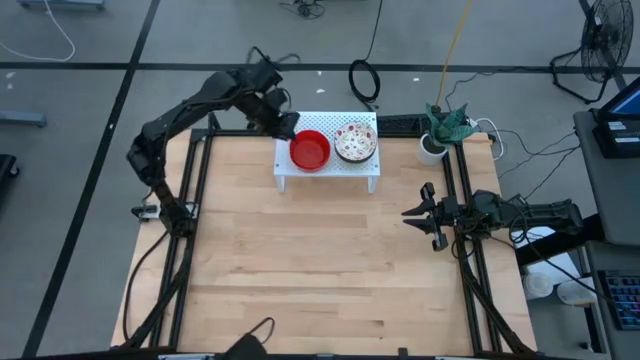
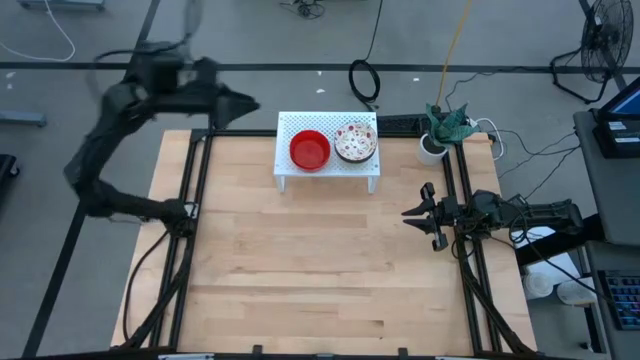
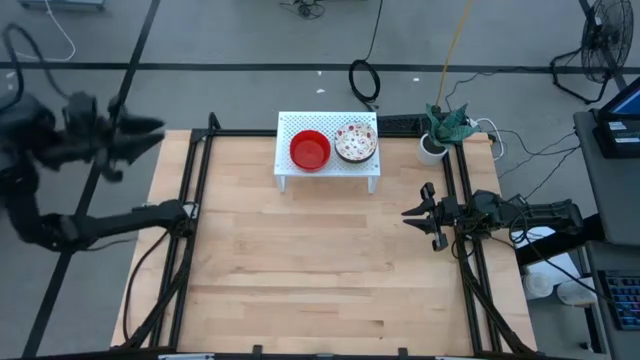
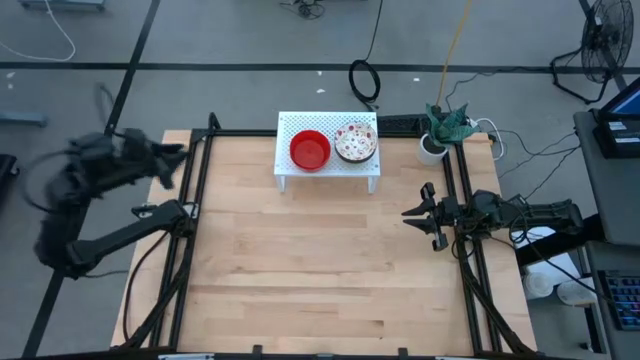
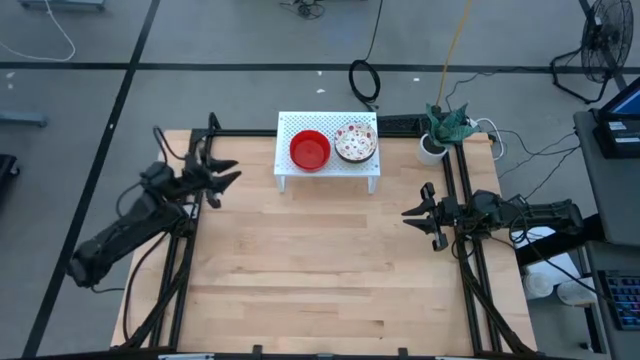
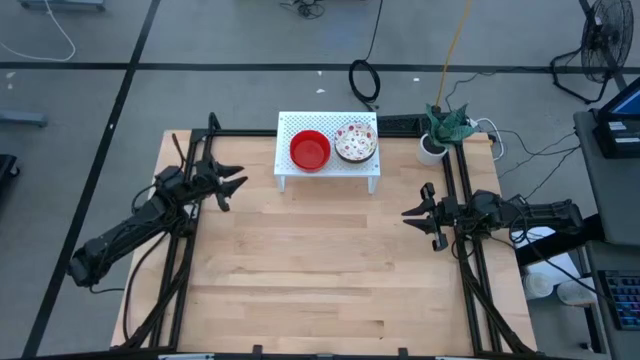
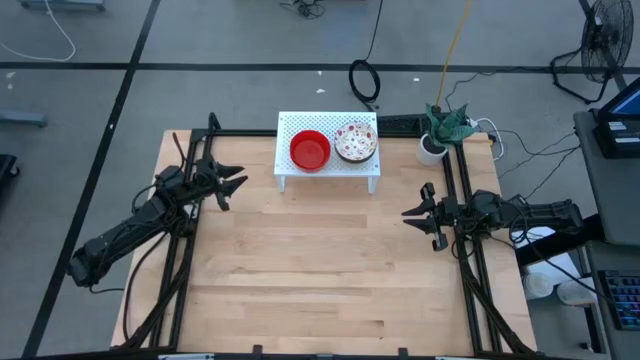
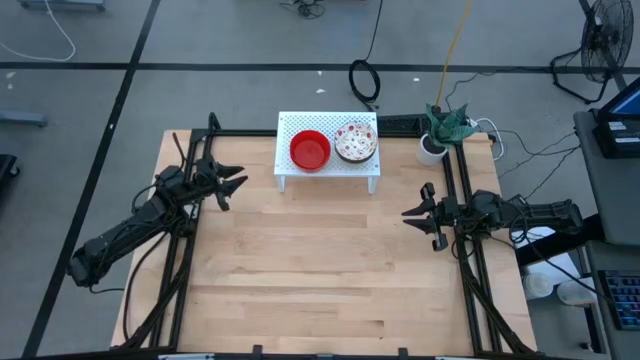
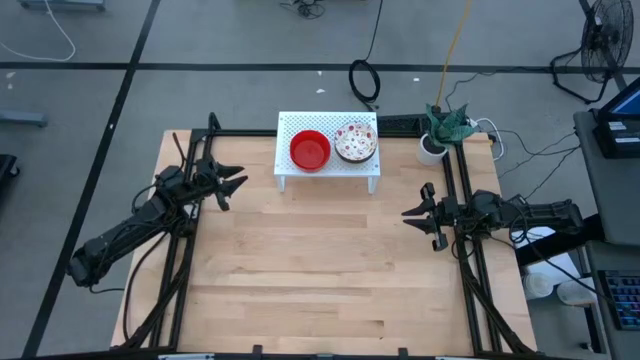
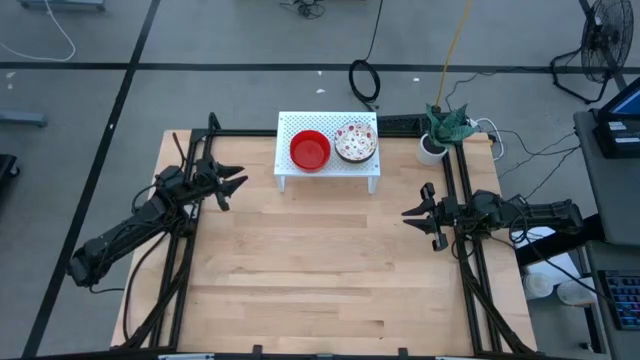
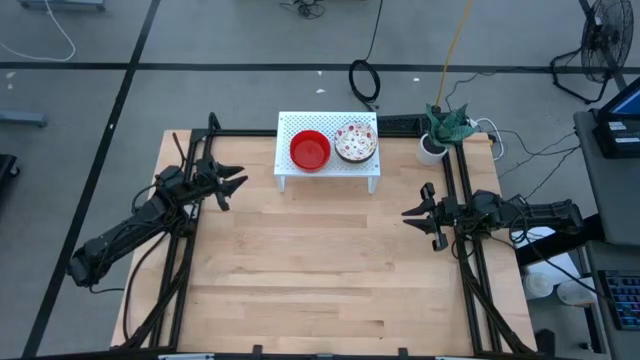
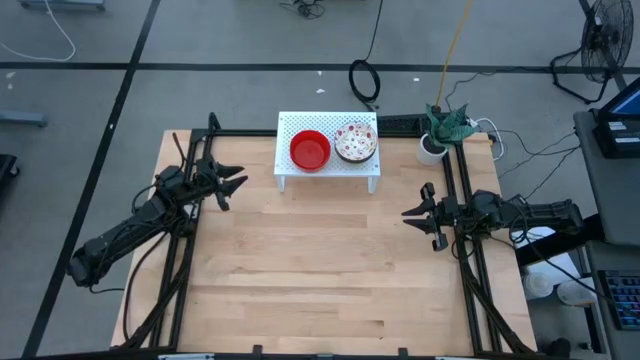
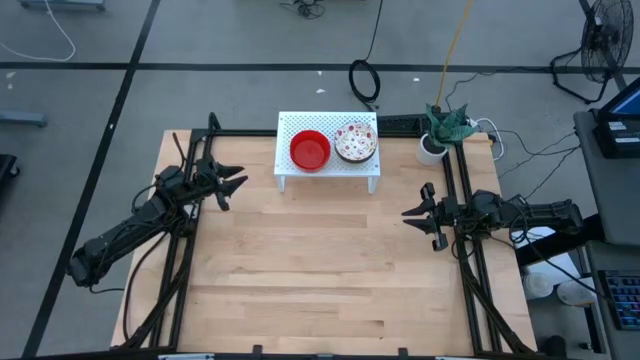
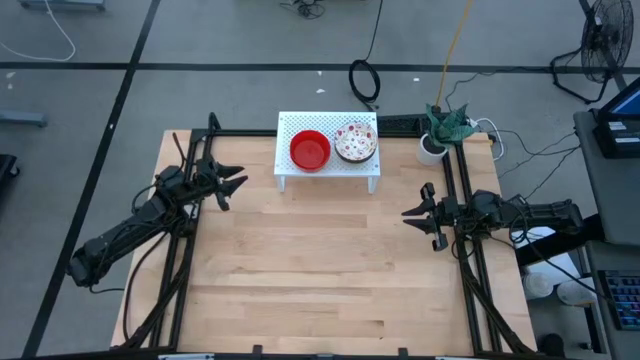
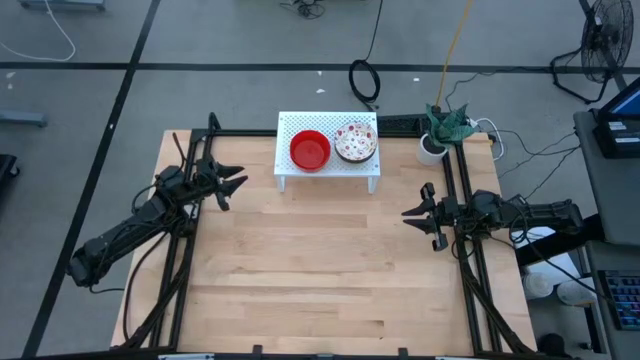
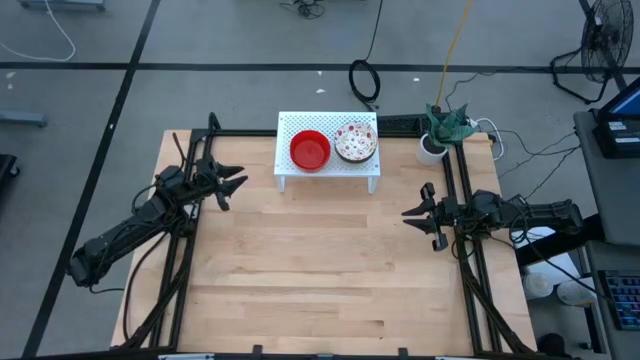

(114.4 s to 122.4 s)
Task: Pick & Place Mini bowls
Return to Home Position

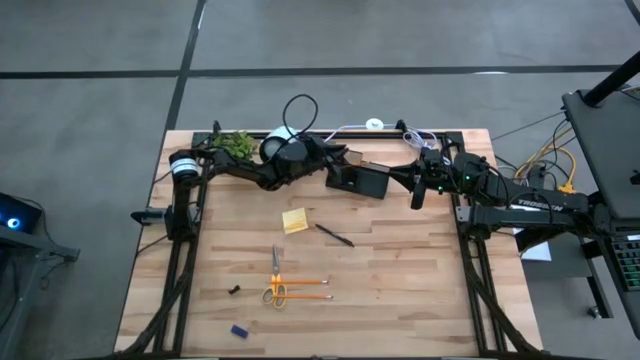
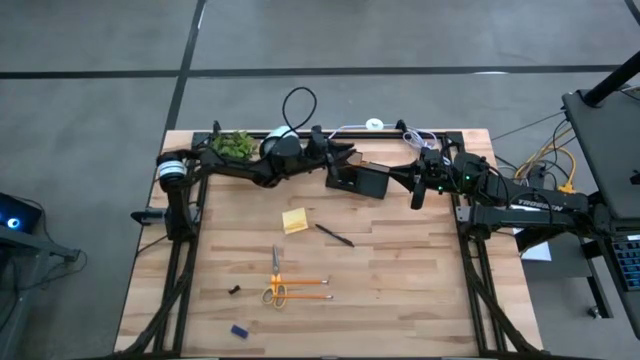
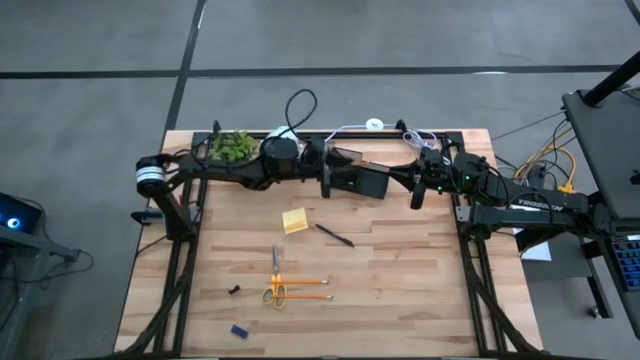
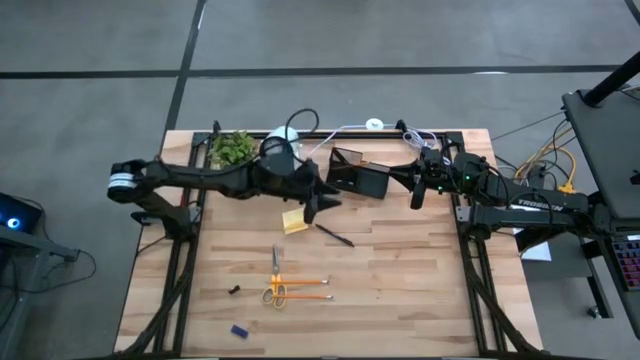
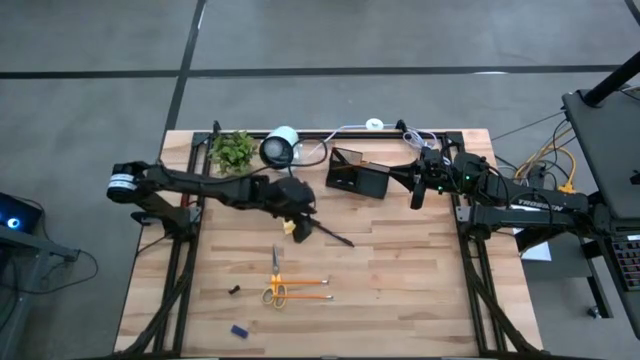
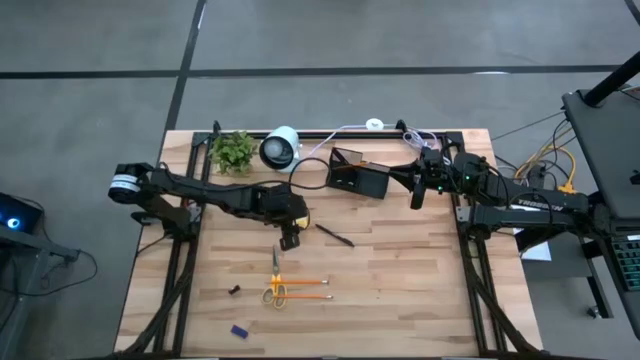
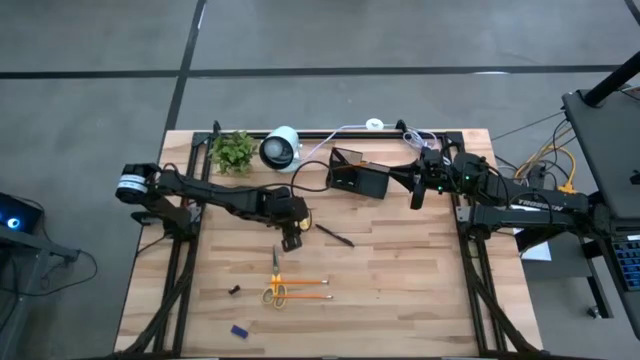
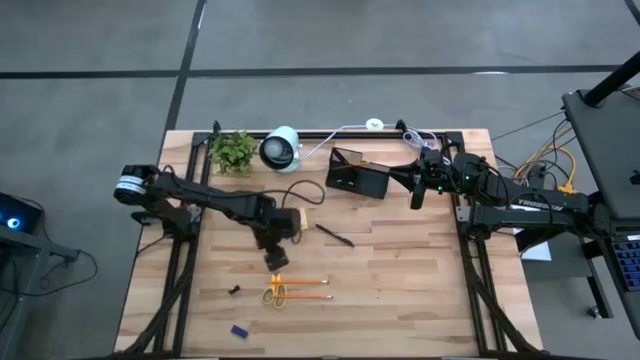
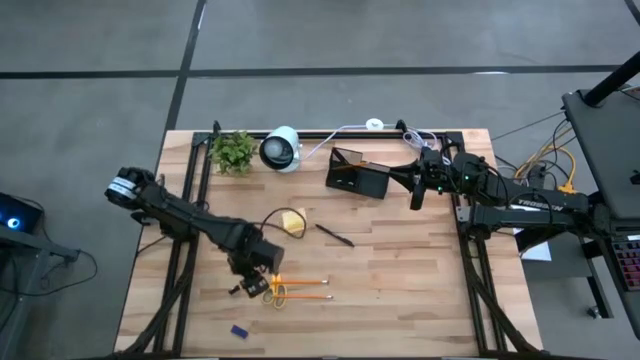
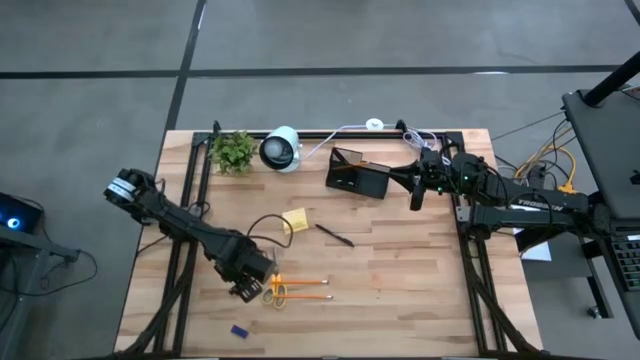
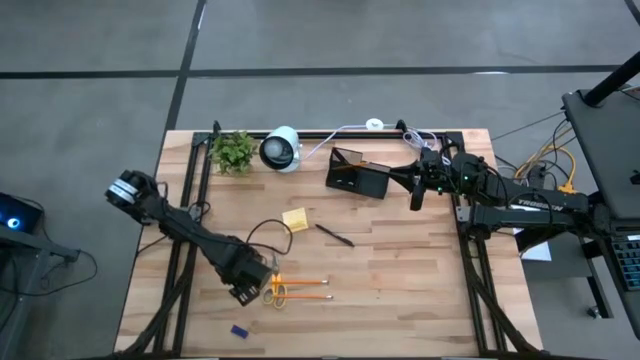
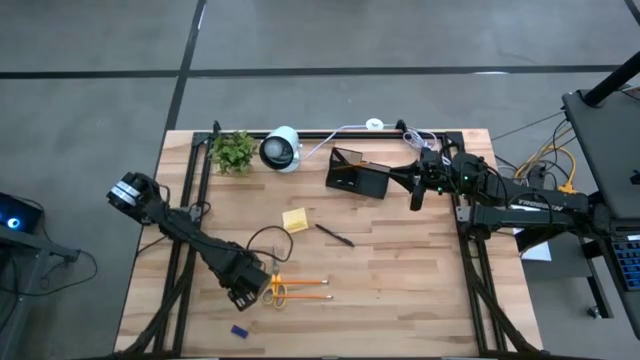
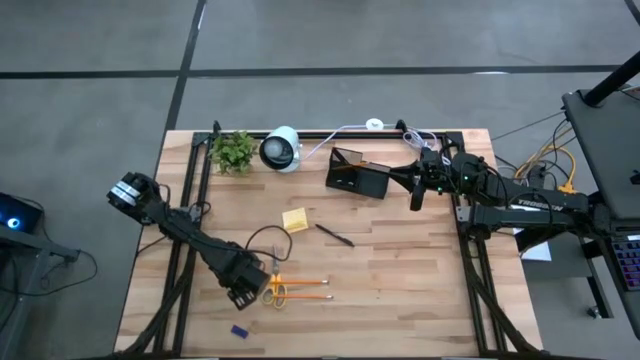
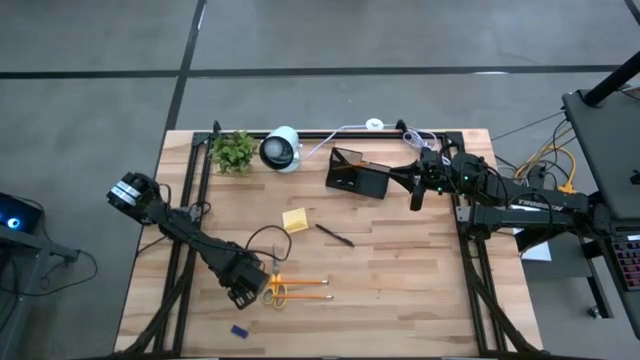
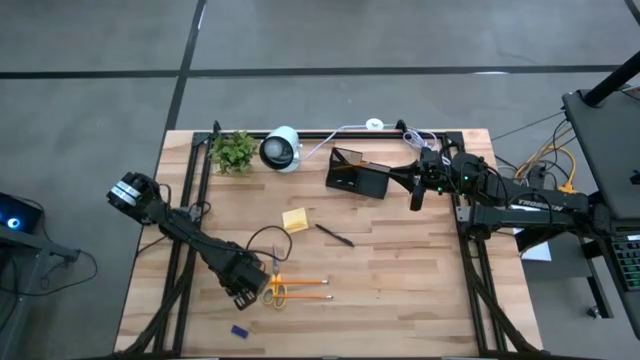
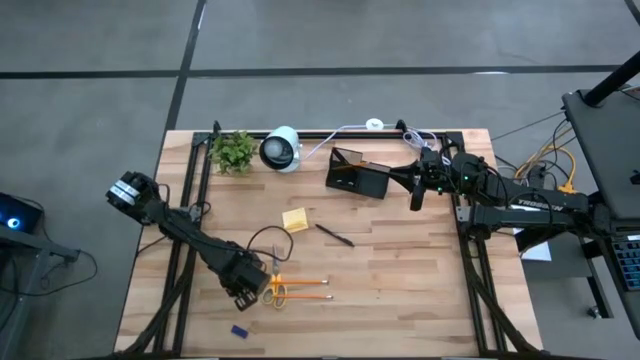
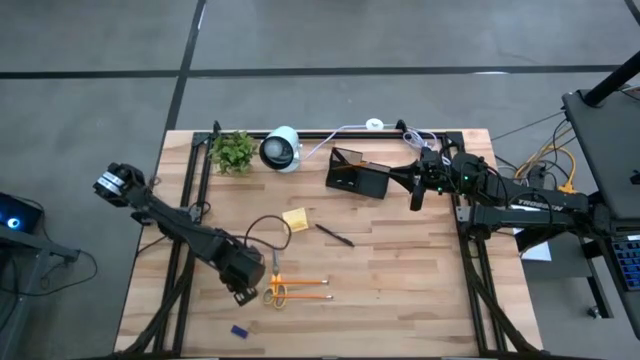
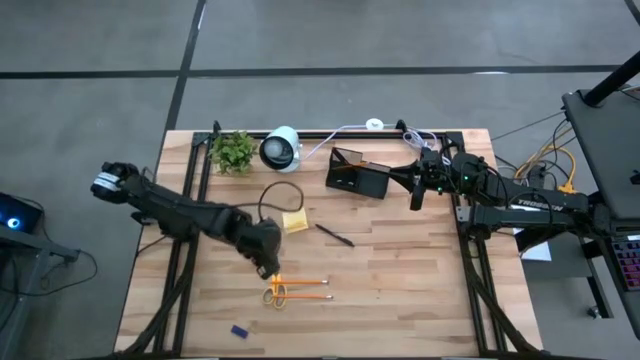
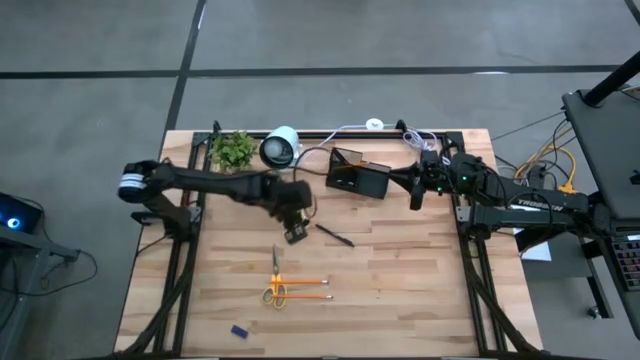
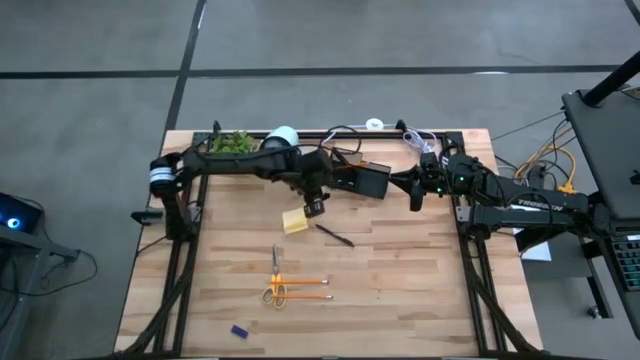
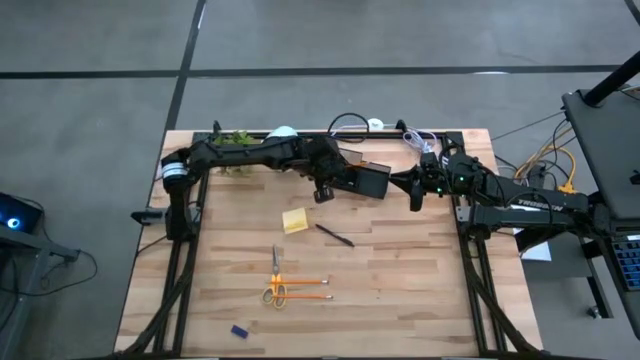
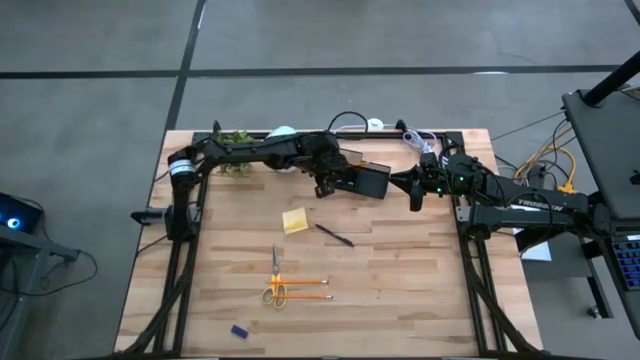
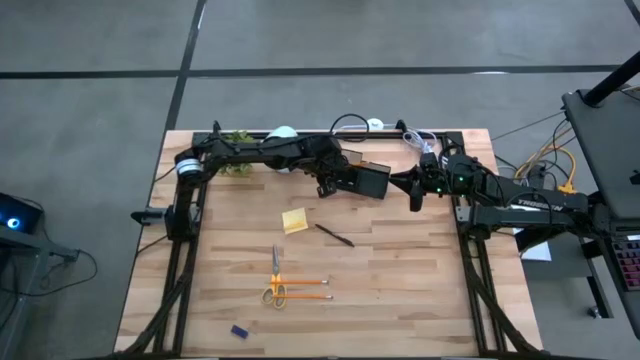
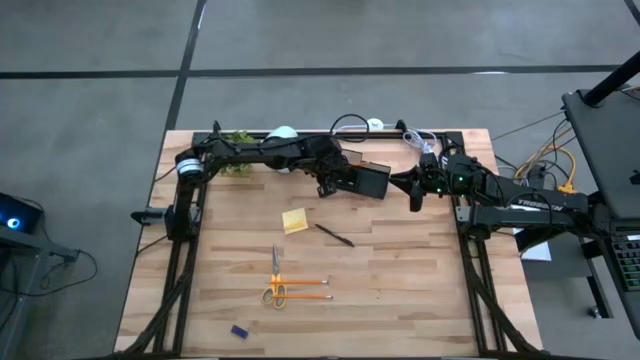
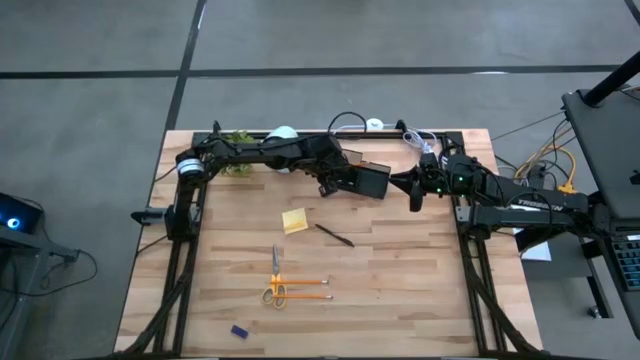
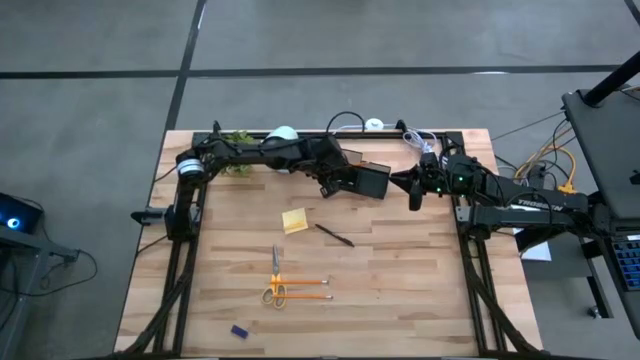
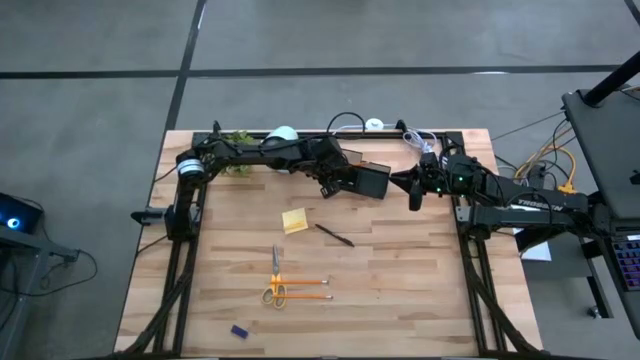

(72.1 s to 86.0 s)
Task: Pick and place office supplies into organizer
Put the binder clip into the desk organizer
